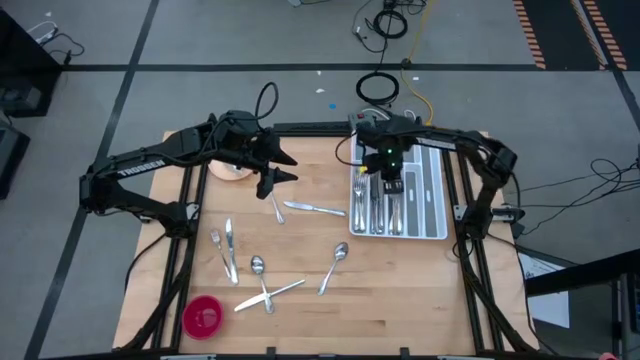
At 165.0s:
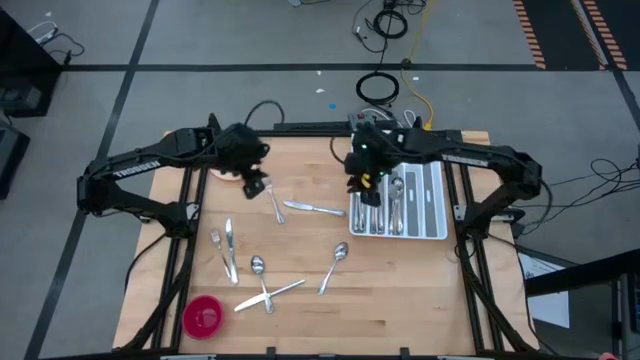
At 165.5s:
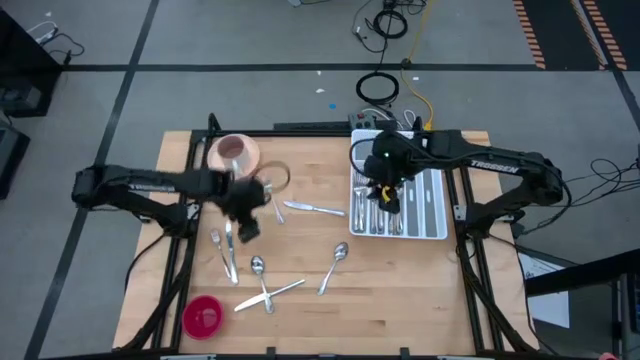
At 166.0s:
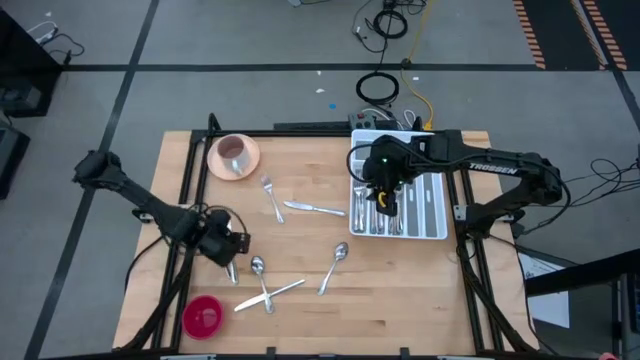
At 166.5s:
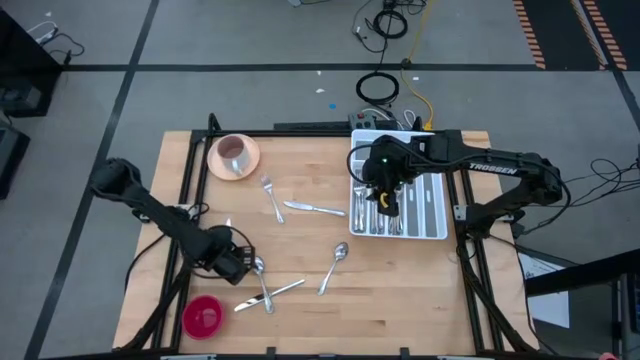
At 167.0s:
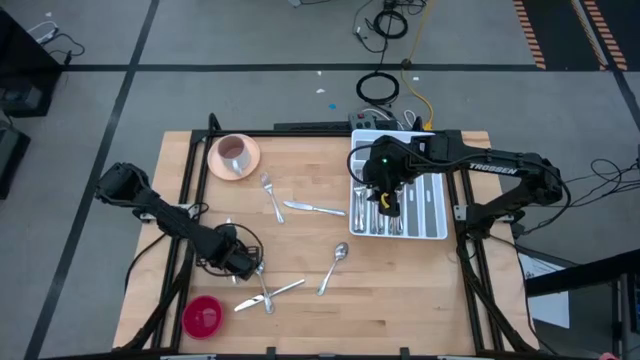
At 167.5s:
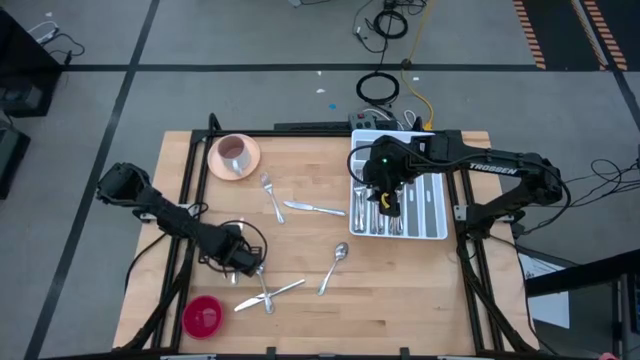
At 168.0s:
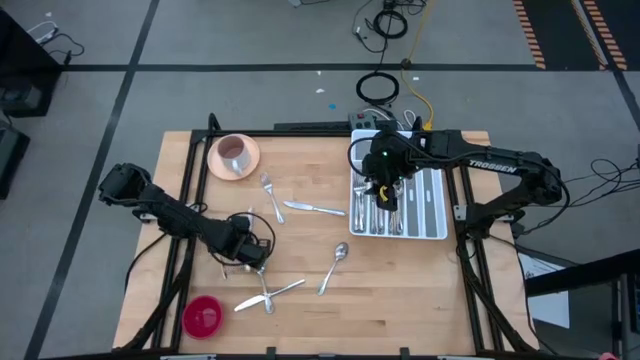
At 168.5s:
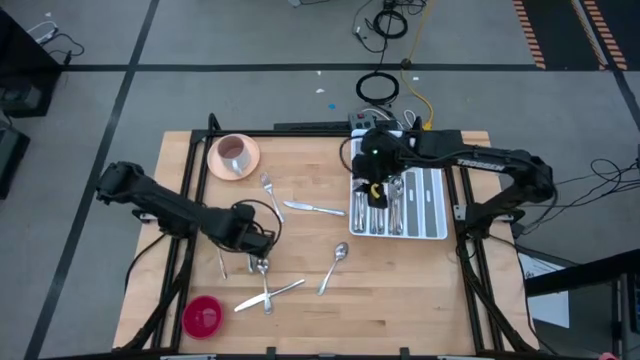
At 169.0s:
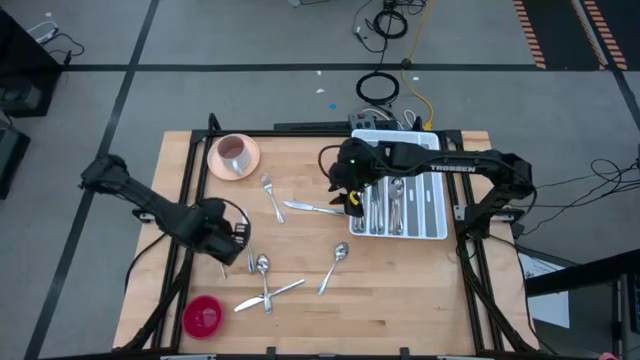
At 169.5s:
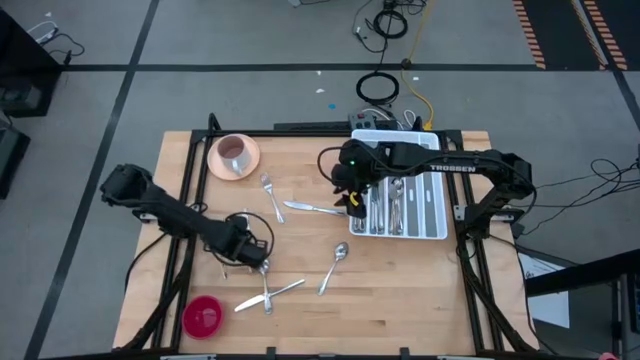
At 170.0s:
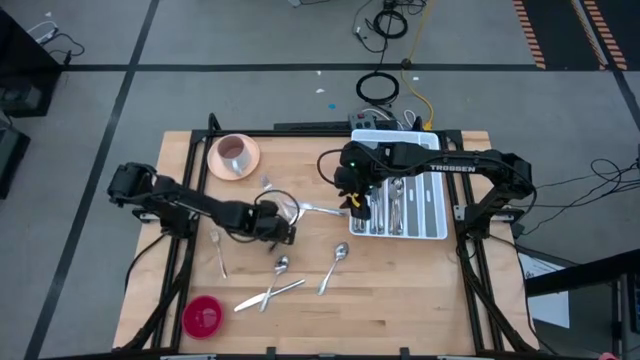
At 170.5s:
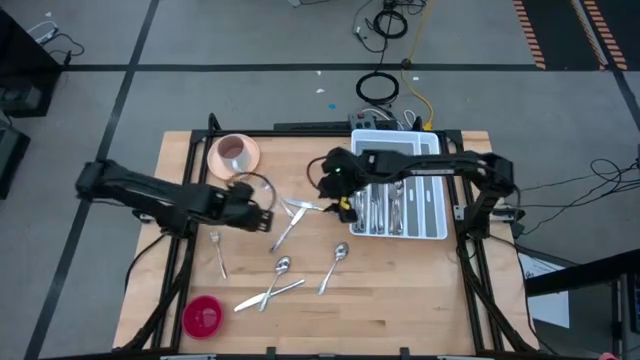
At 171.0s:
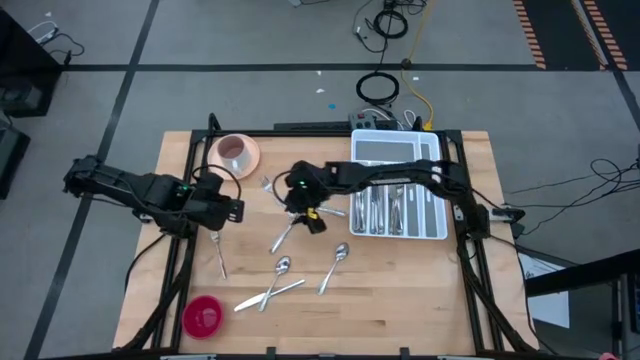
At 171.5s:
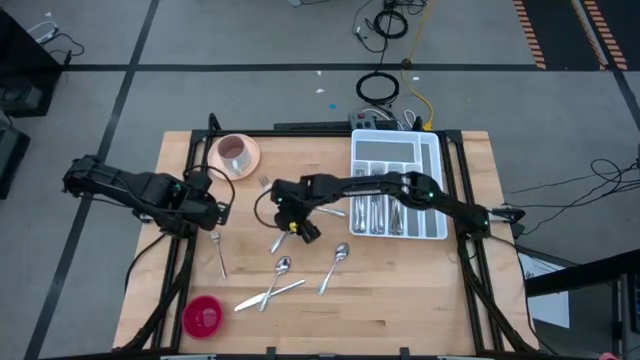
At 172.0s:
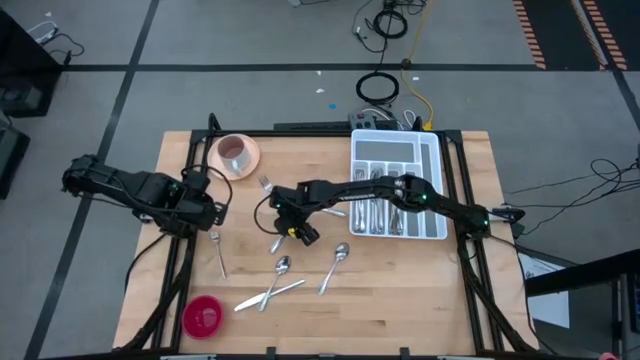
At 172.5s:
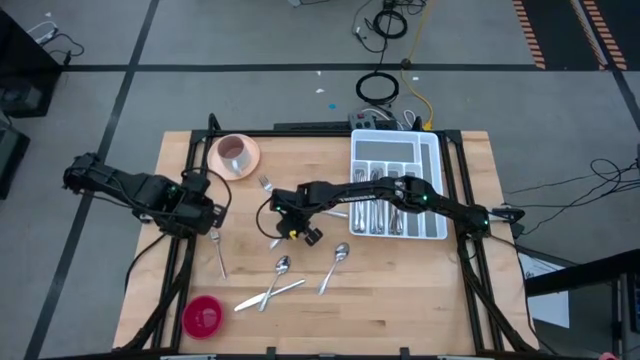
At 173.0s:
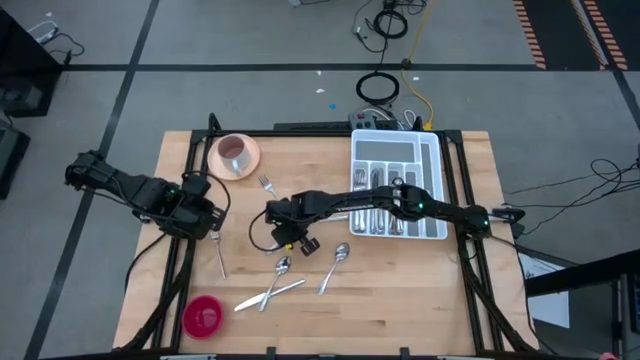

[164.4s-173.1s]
Task: Sort silverware
Put the top left silver knife into the white silverware tray

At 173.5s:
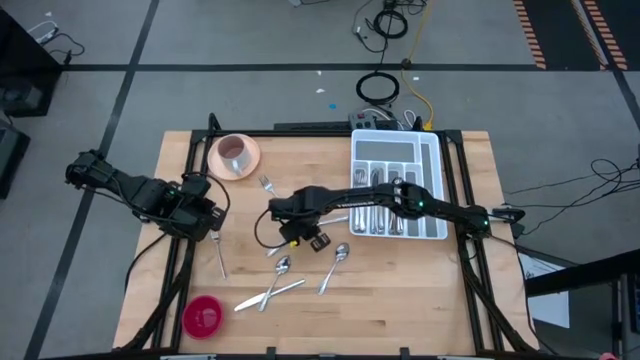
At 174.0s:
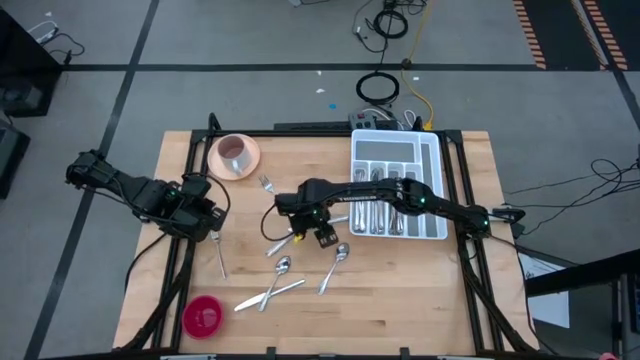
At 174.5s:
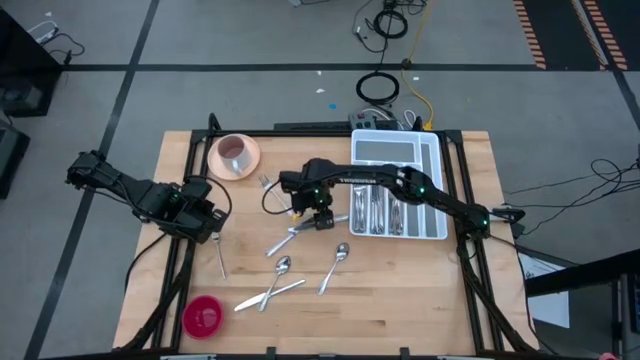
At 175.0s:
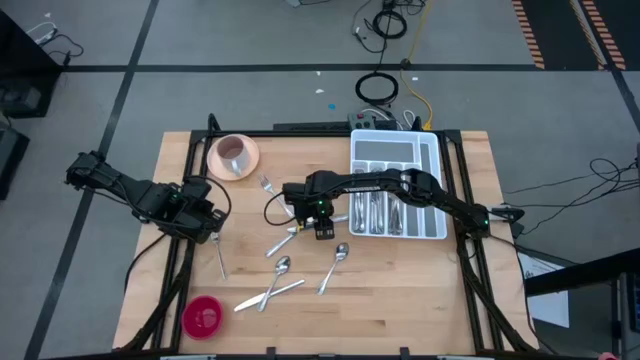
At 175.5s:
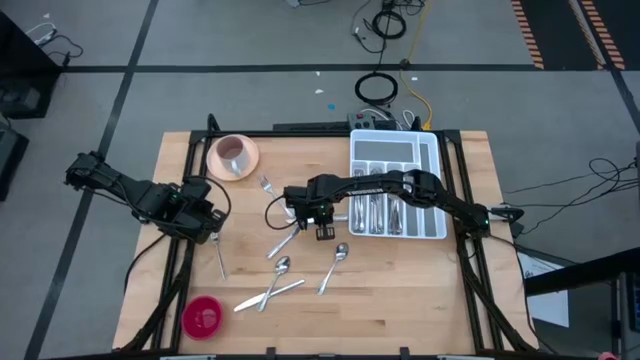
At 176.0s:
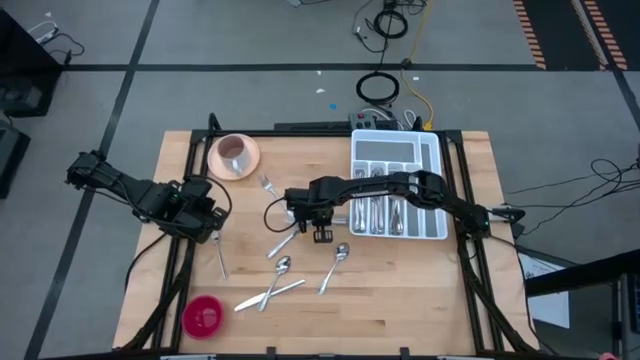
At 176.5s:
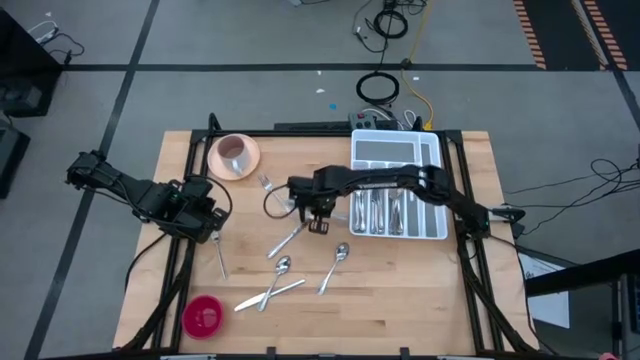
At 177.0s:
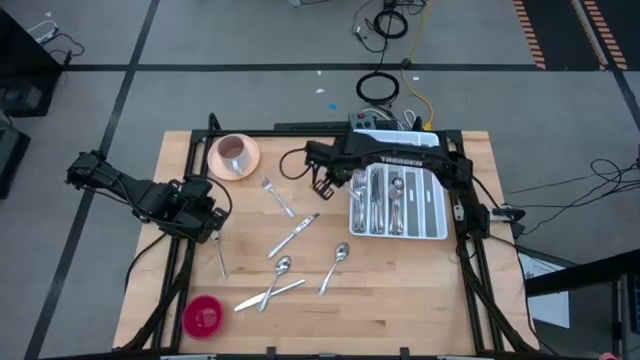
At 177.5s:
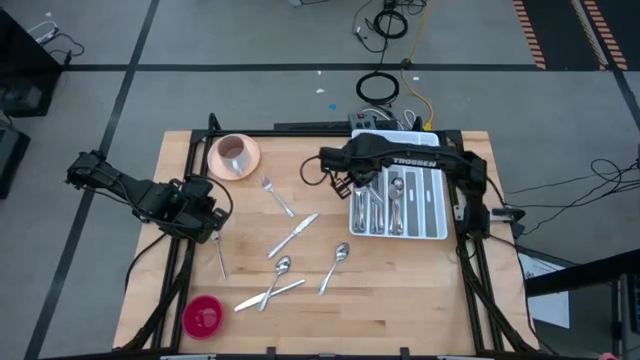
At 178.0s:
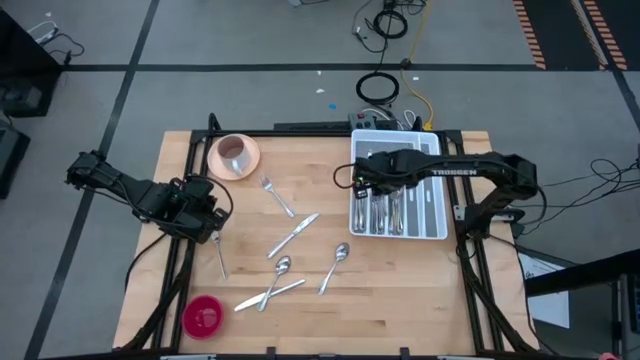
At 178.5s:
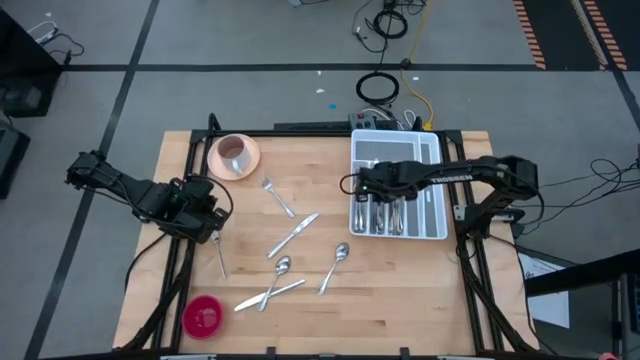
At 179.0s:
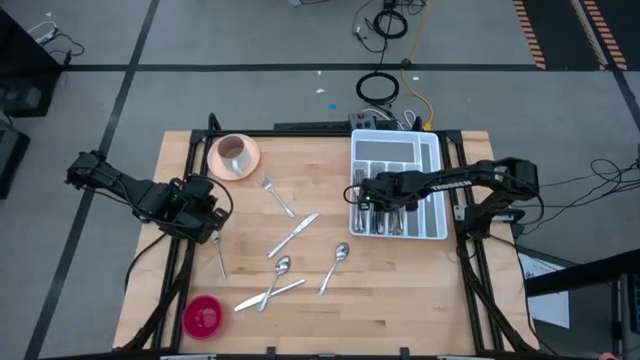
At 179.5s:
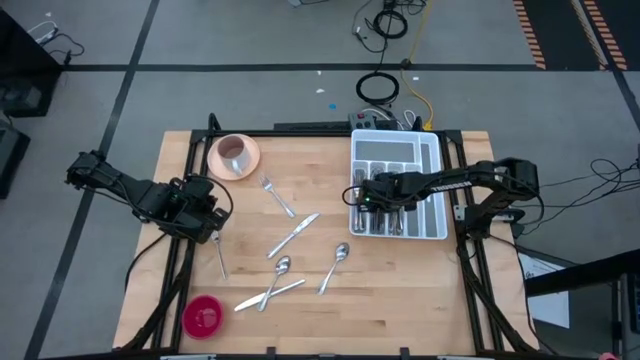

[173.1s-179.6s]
Put the top silver knife into the white silverware tray

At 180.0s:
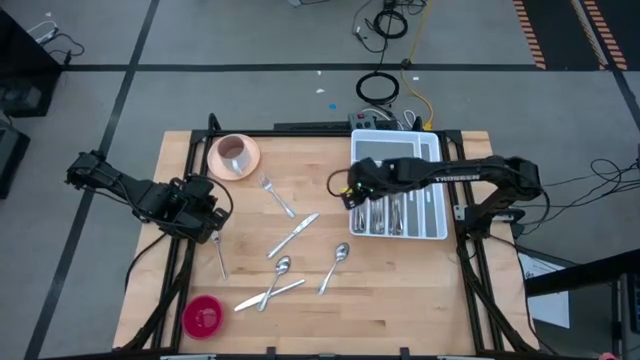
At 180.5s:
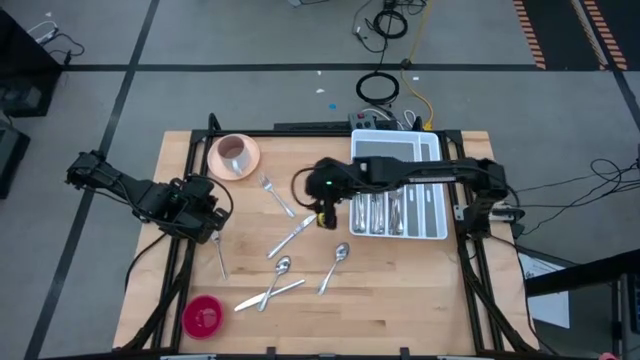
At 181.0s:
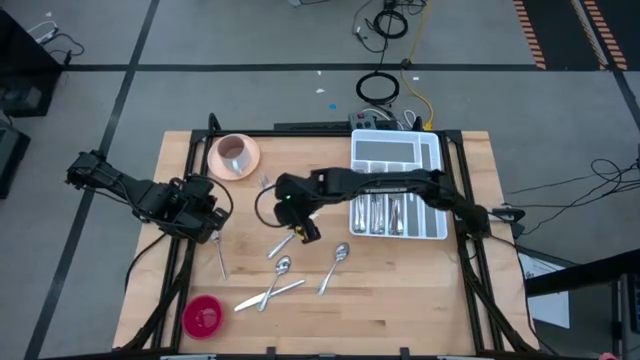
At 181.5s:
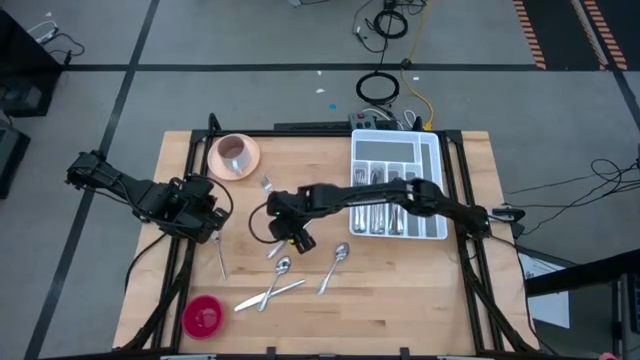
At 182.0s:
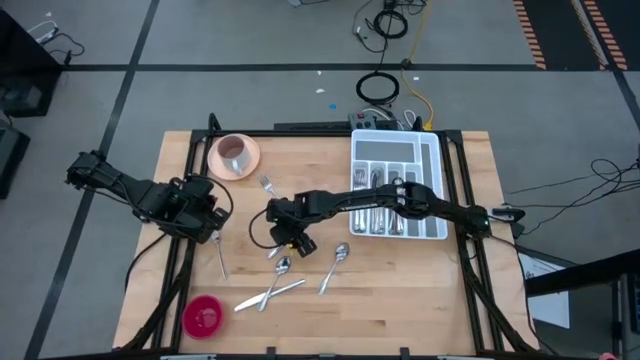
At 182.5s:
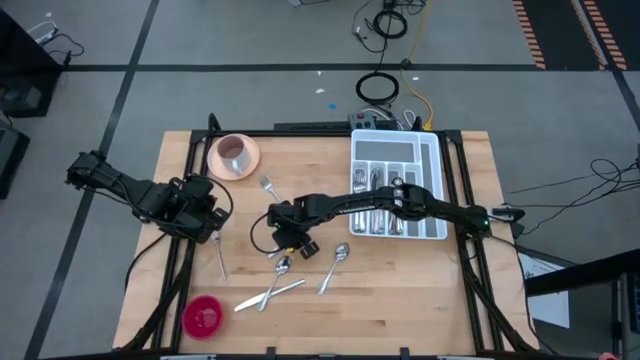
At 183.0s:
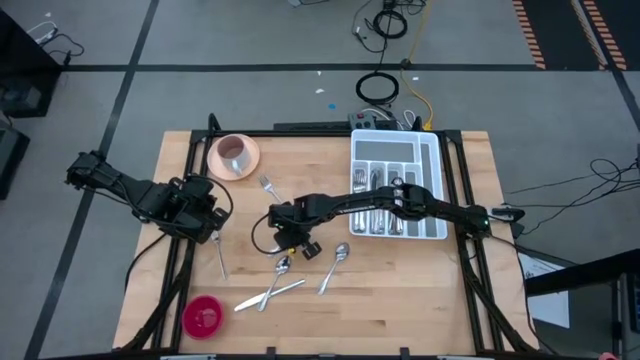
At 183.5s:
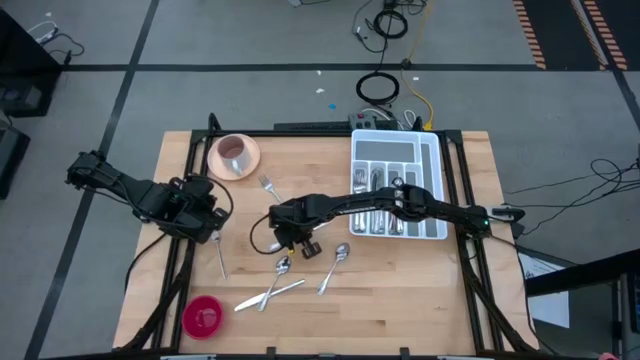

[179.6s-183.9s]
Put the top silver knife into the white silverware tray

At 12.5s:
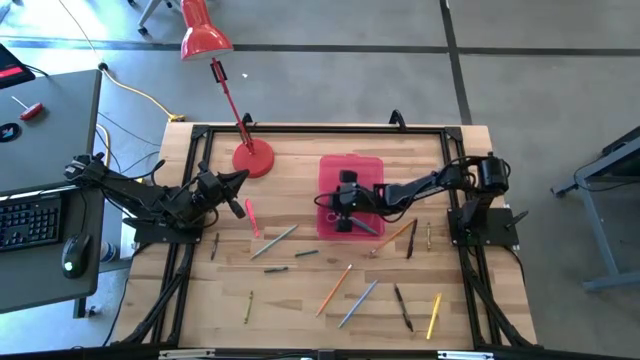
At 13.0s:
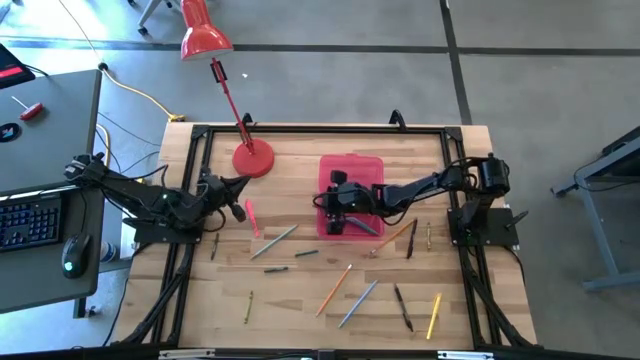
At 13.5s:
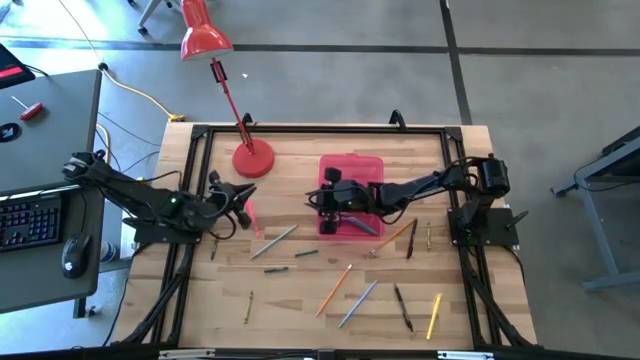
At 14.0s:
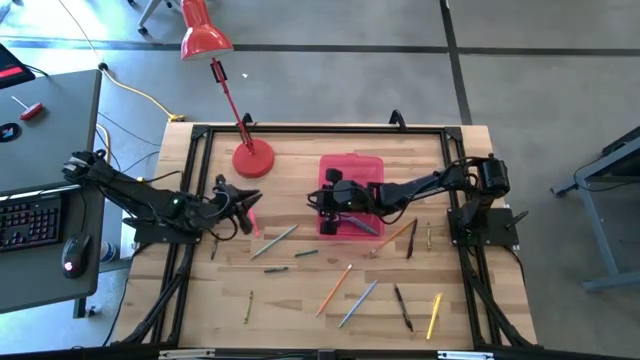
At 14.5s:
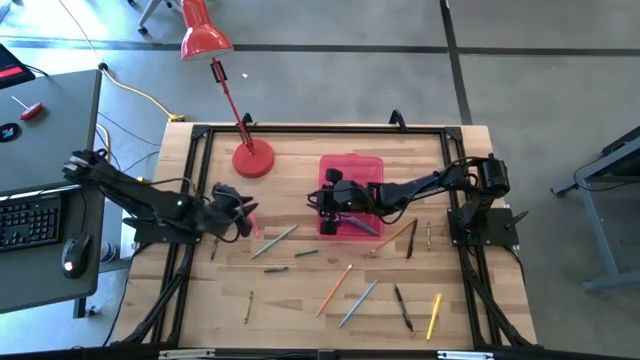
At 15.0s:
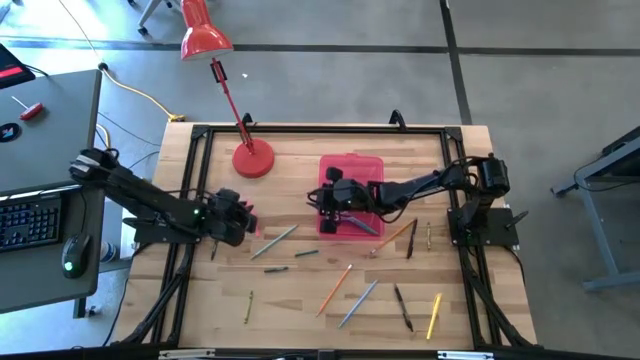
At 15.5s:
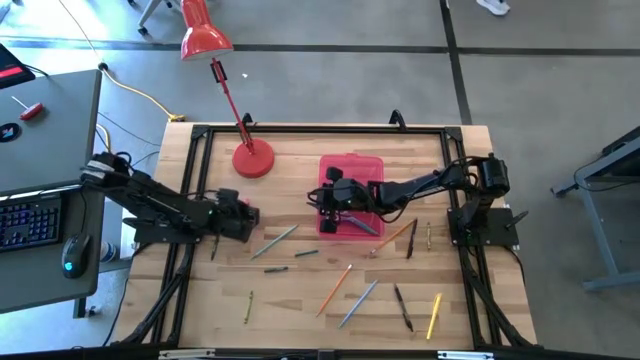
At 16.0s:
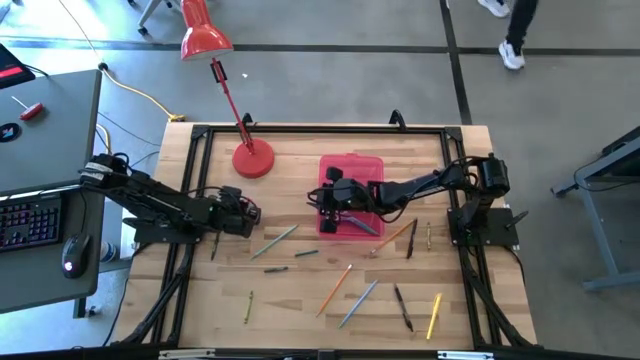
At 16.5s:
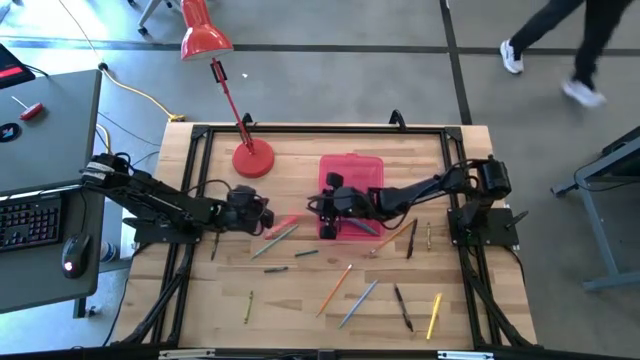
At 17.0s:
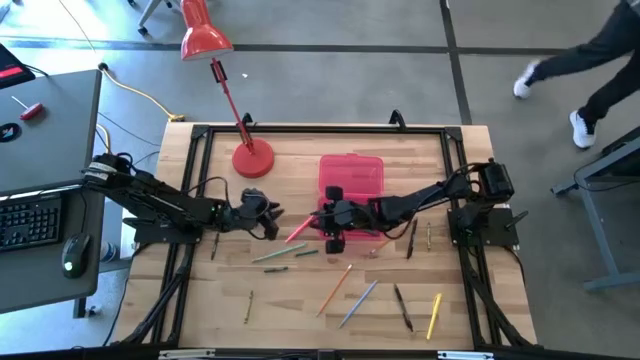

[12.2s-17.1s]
Task: Pick & place school supplies into a supply box
Put the pink pen into the red supply box
